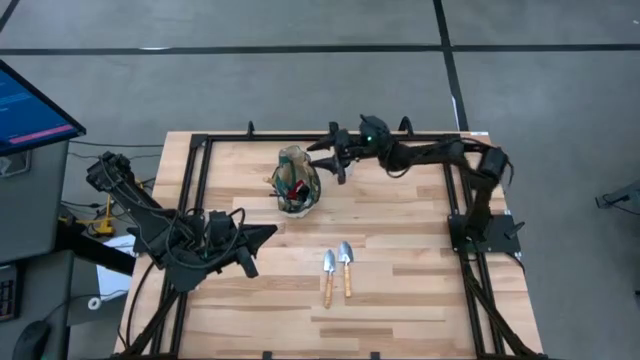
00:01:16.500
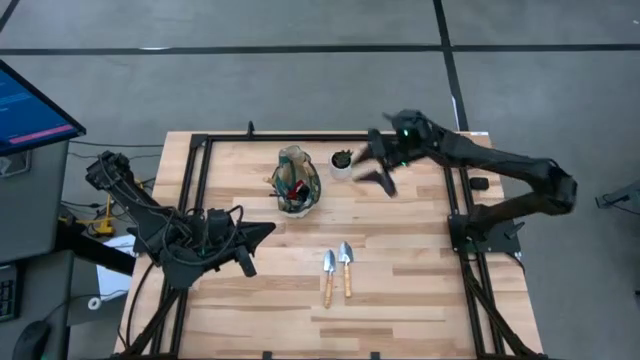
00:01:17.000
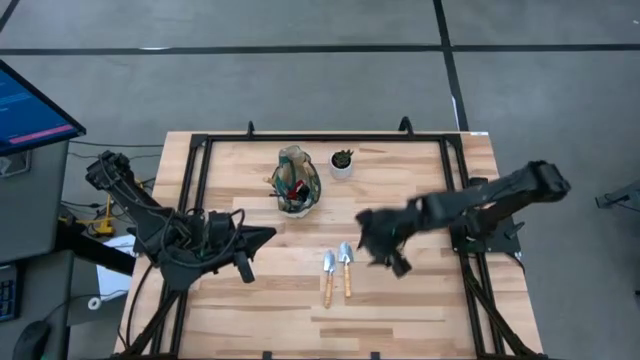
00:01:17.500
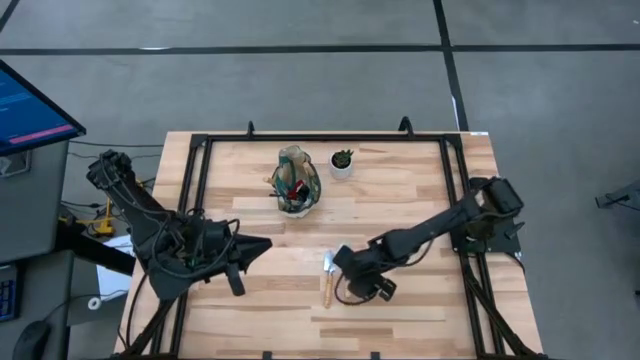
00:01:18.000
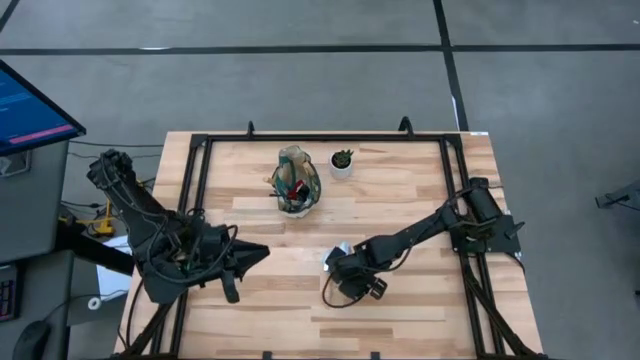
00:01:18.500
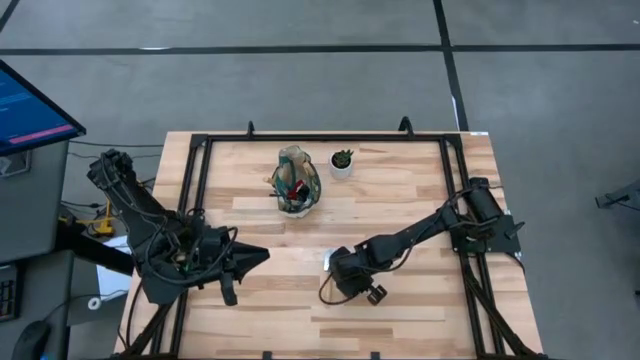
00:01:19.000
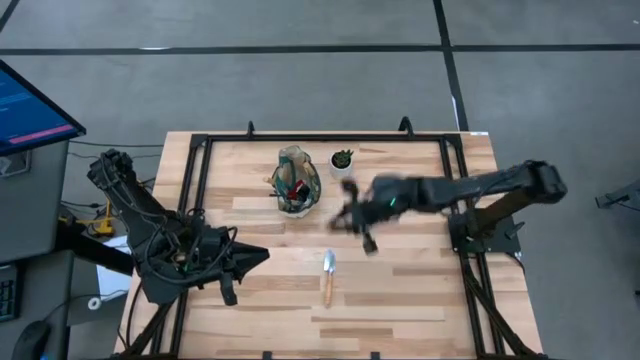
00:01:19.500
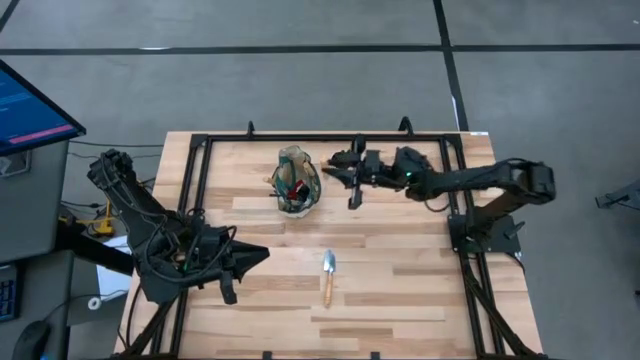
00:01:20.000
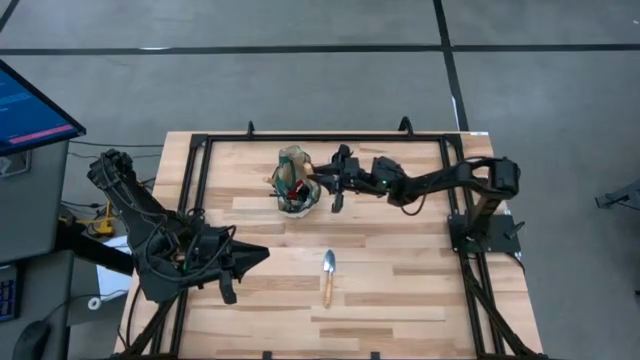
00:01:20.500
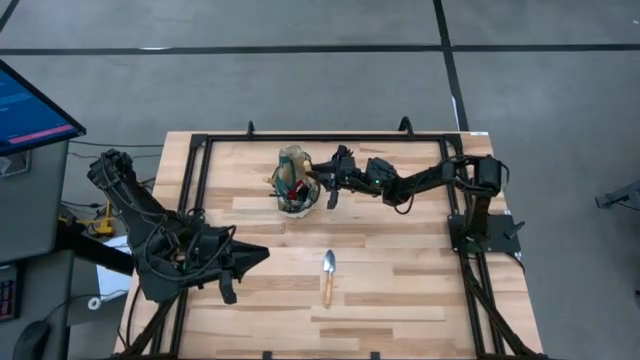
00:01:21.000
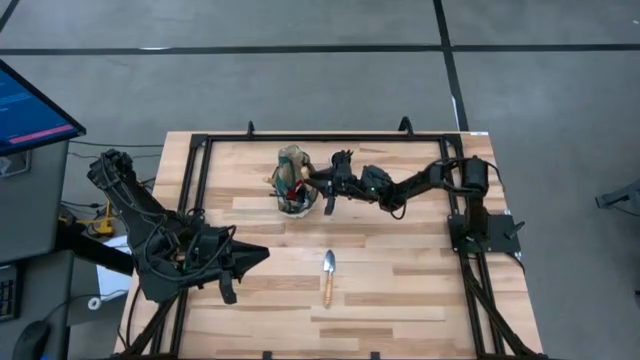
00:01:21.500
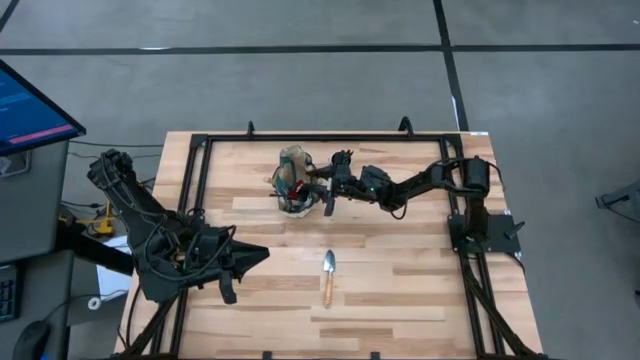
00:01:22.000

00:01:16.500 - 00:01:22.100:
Task: Pick & Place Garden tools in Gardening bag
Put the right light brown trowel into the pocket of the white gardening bag

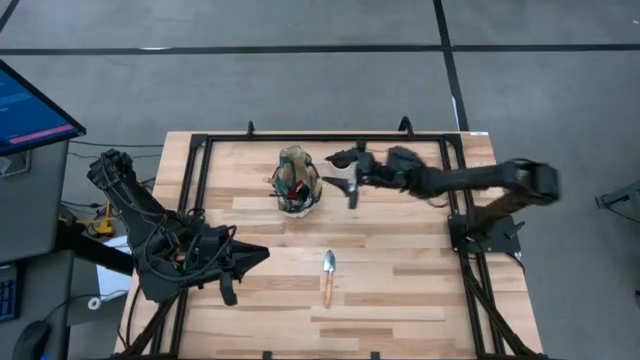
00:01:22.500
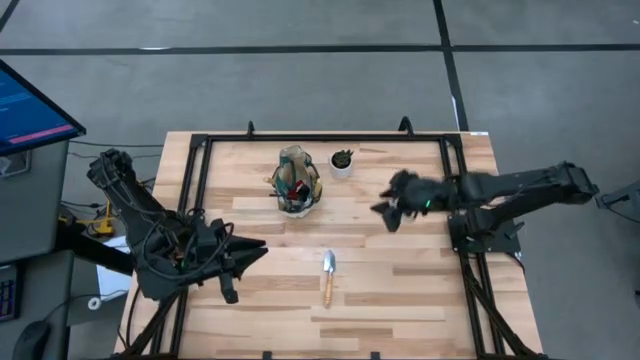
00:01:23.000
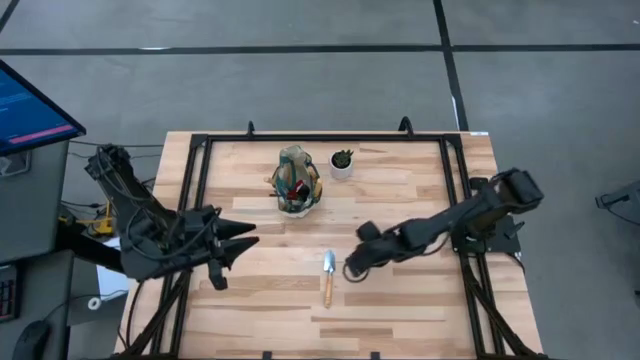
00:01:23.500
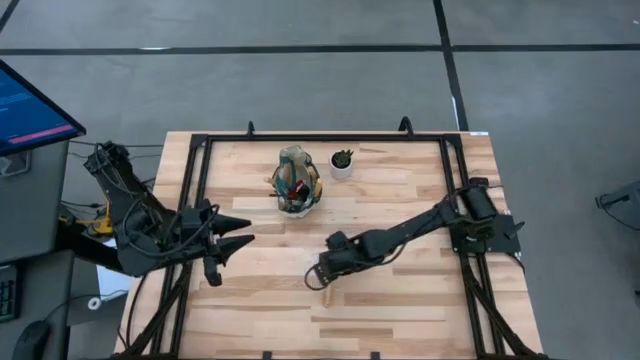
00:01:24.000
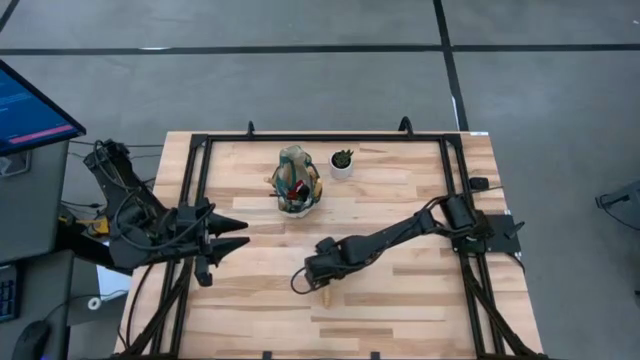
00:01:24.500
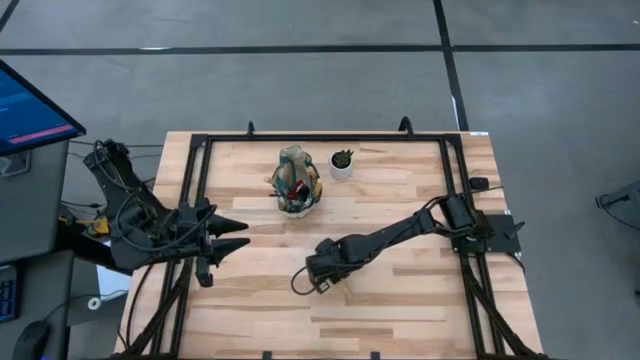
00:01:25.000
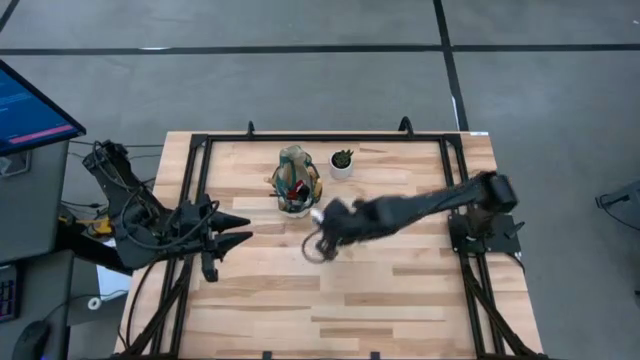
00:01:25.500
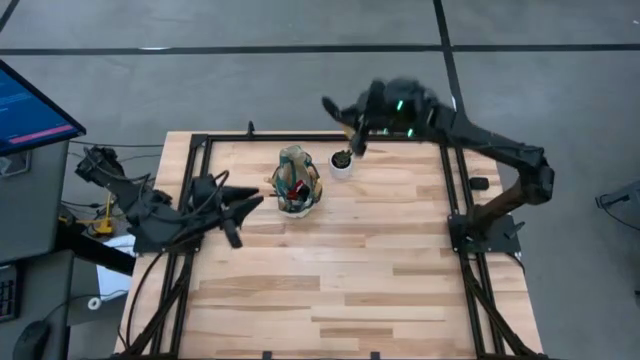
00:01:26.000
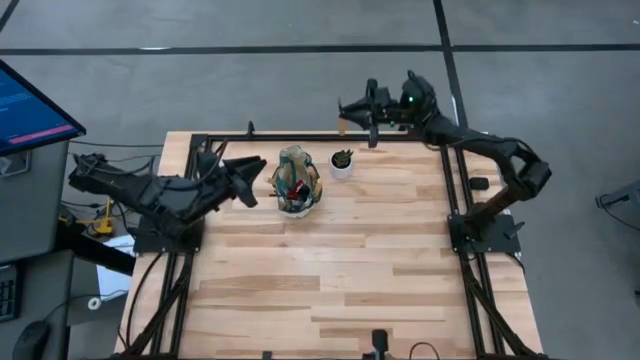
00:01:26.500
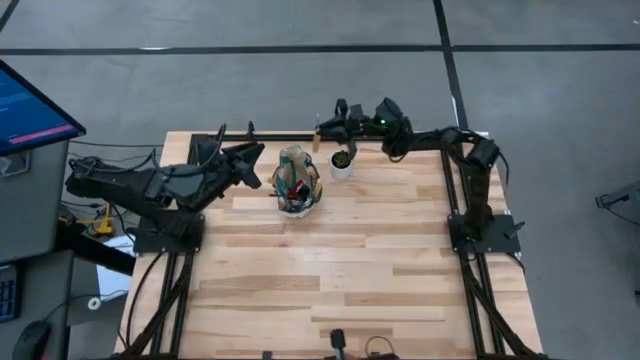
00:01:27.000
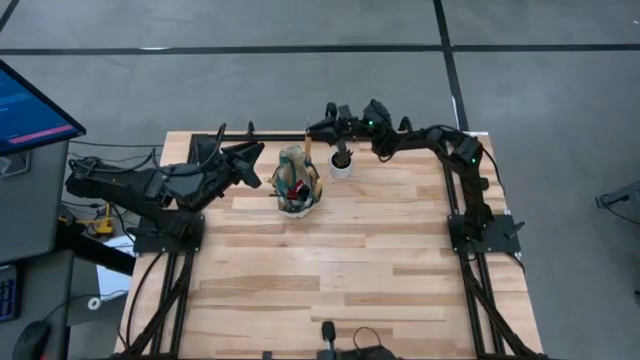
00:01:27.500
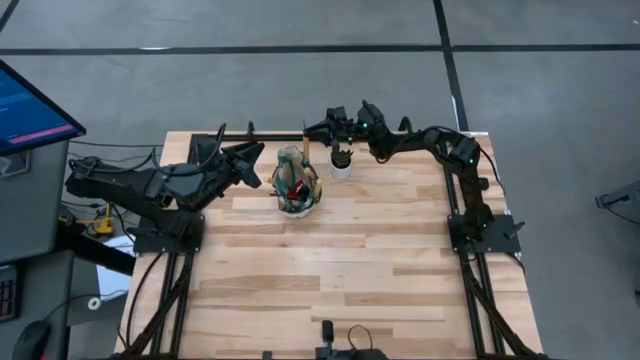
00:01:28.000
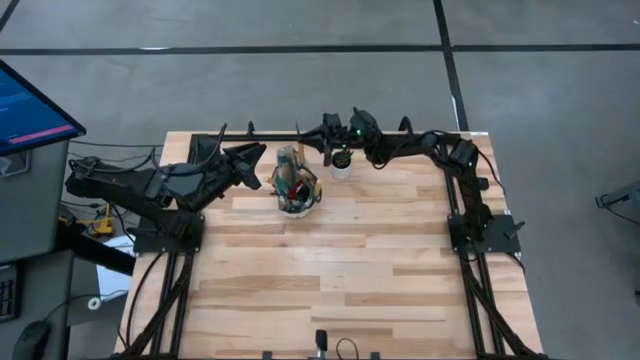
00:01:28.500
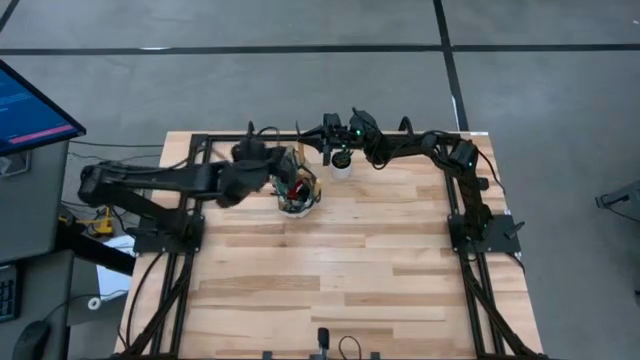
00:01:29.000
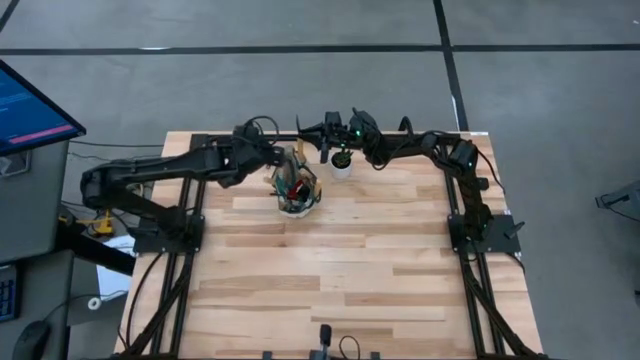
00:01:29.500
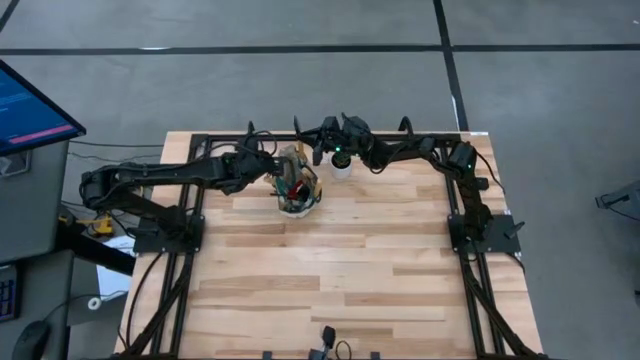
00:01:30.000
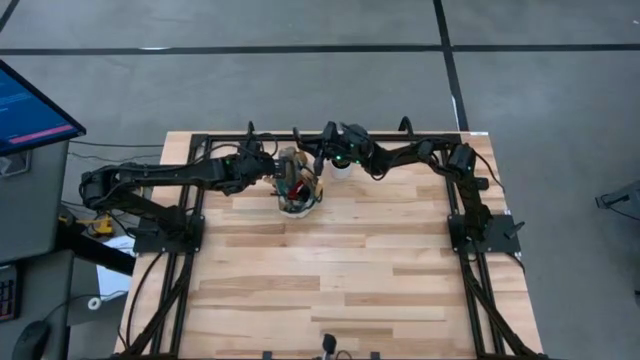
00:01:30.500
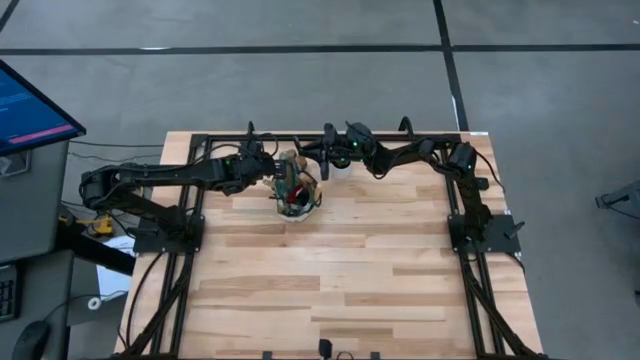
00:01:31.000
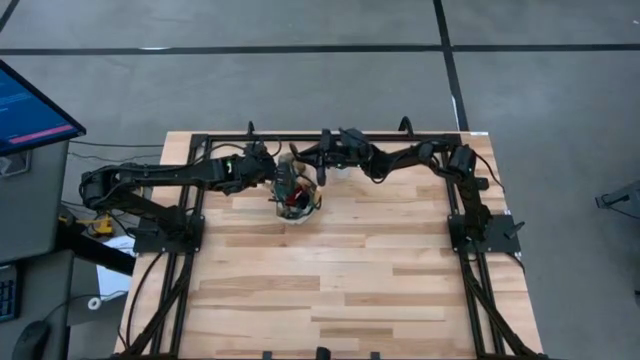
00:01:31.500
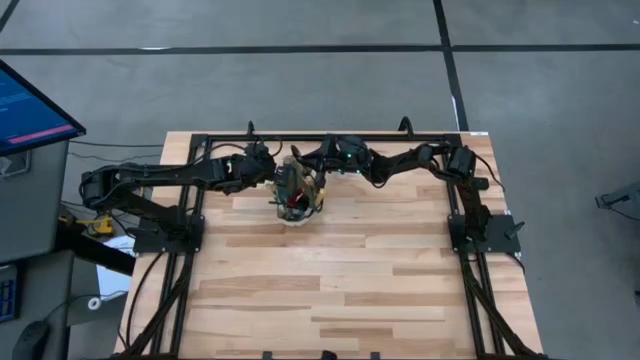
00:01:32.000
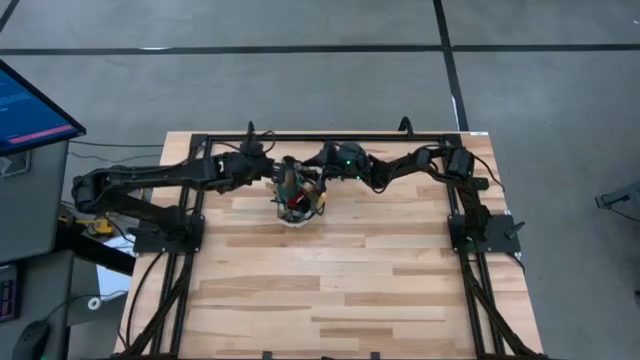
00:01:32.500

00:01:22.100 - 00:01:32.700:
Put the light brown trowel into the pocket of the white gardening bag

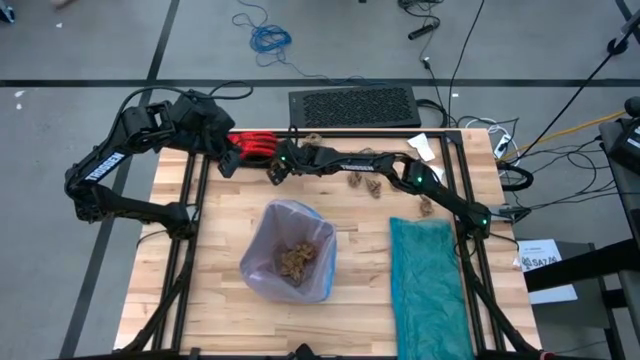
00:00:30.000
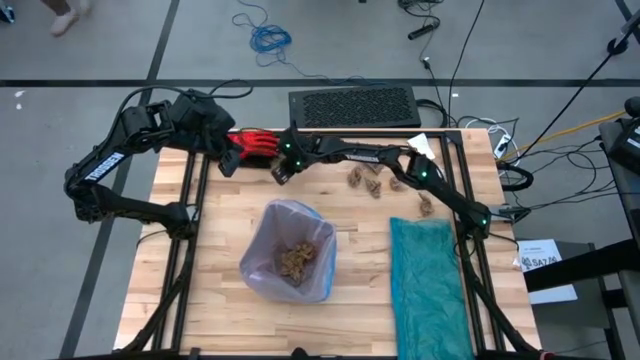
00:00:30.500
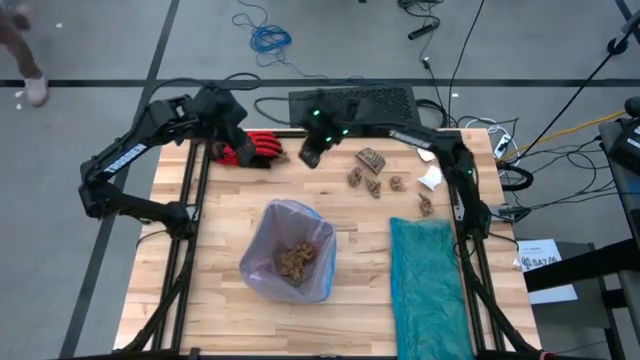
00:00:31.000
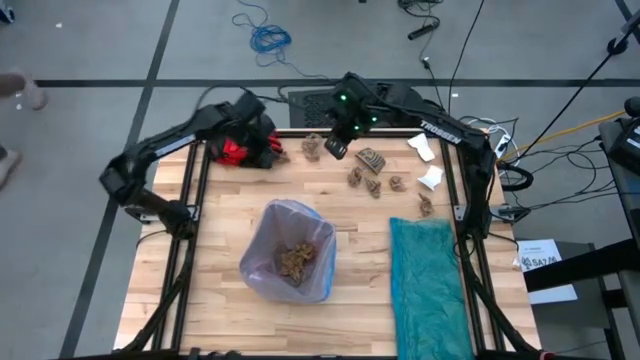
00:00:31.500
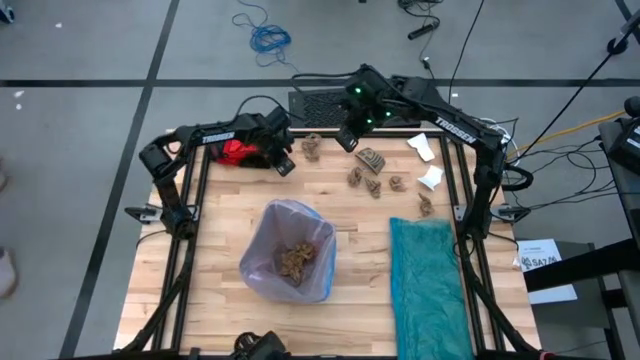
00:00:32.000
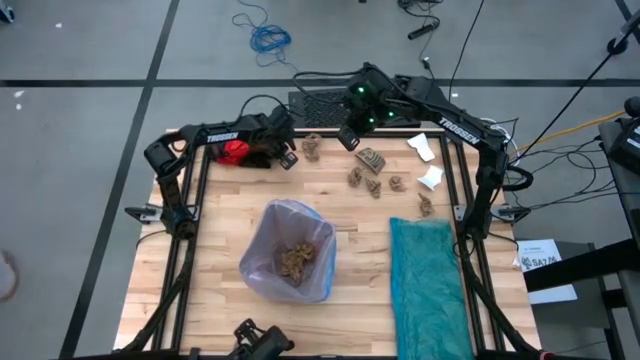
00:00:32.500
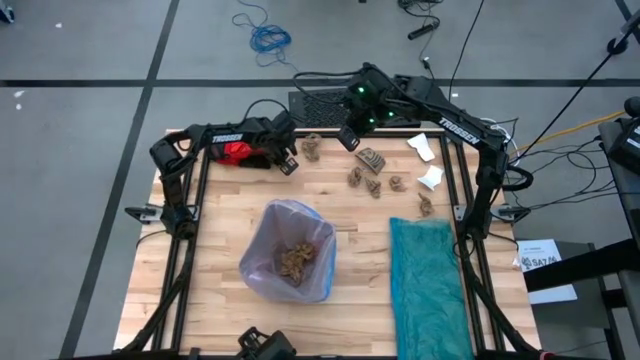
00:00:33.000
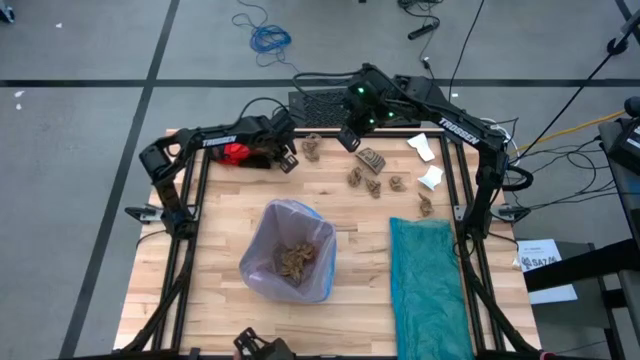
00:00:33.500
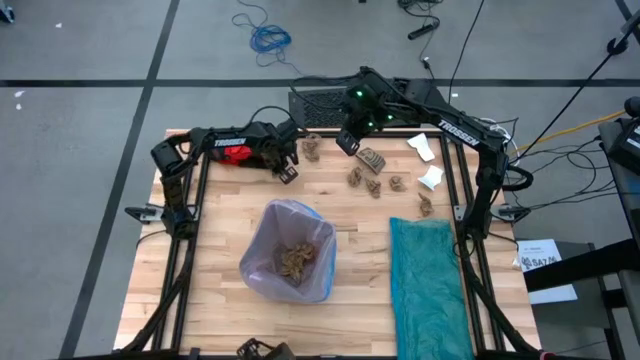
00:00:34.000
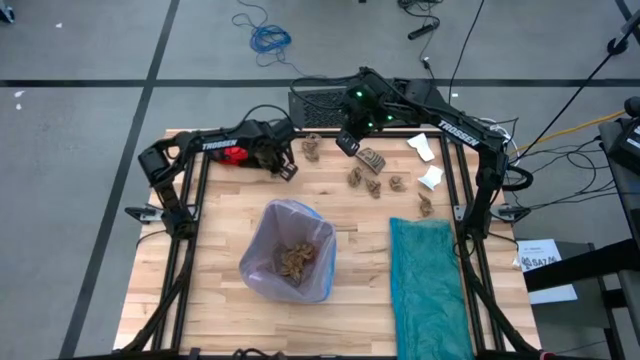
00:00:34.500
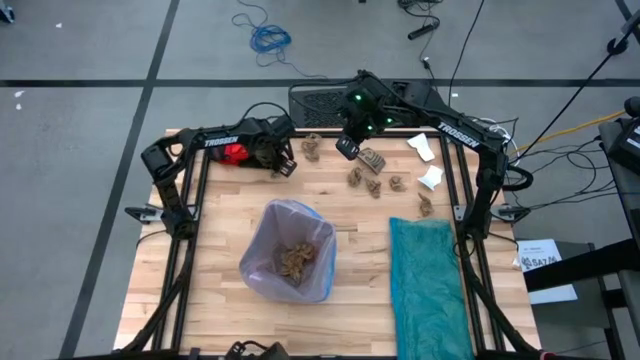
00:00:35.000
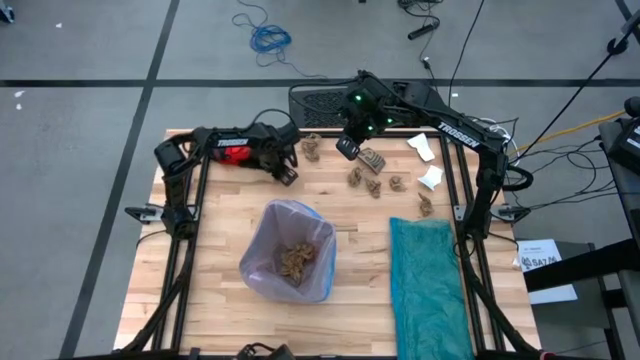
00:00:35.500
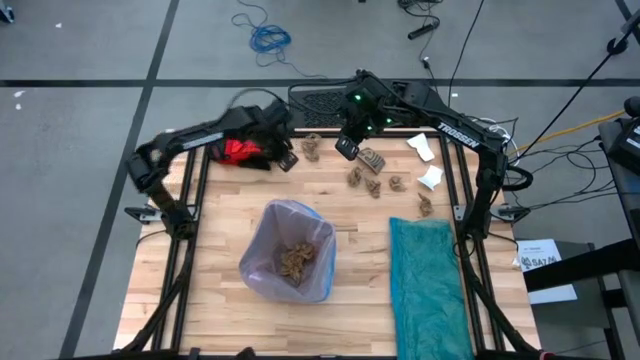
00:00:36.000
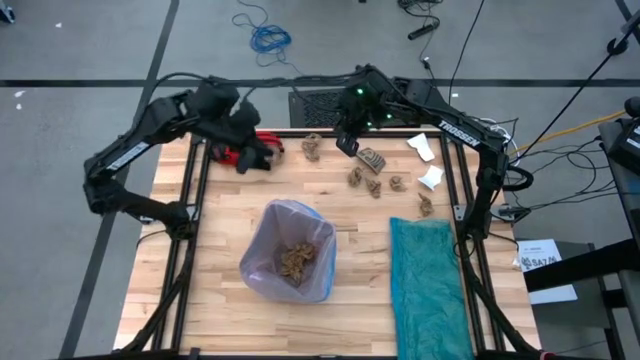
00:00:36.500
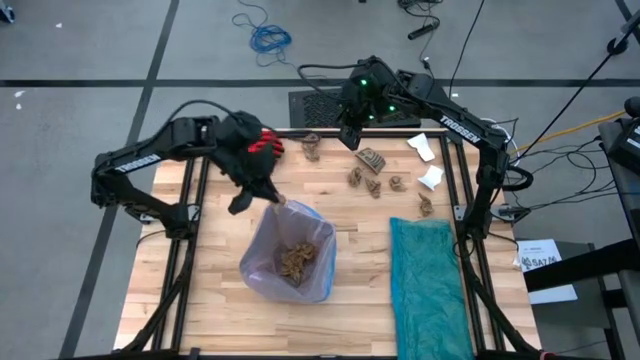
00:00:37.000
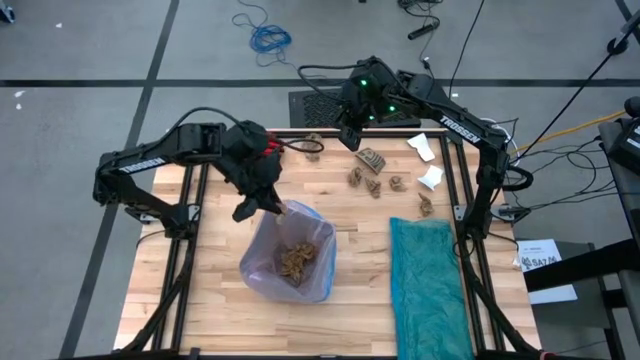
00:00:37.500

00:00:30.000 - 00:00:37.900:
Task: place trash/remove bag and relplace
Put the brown napkin into the trash bin
